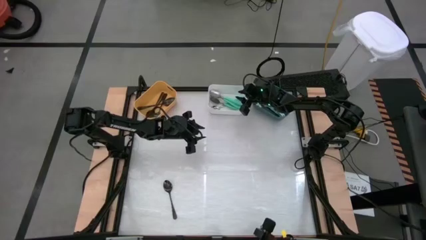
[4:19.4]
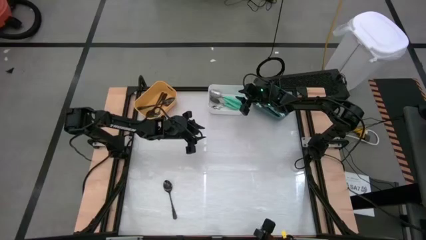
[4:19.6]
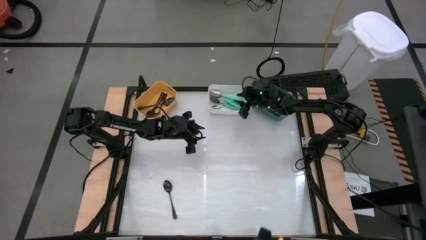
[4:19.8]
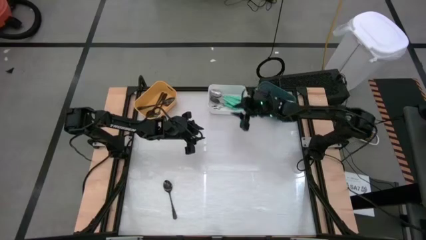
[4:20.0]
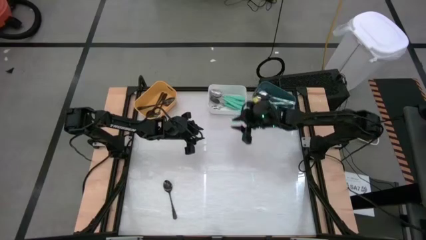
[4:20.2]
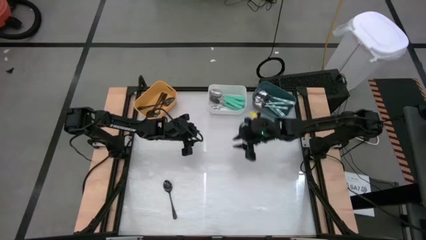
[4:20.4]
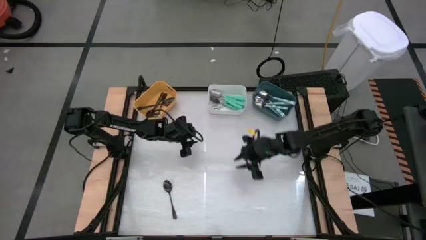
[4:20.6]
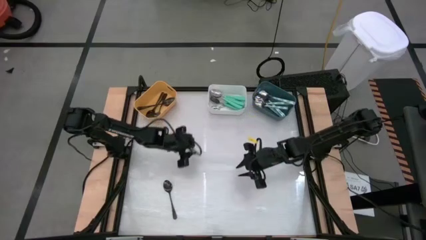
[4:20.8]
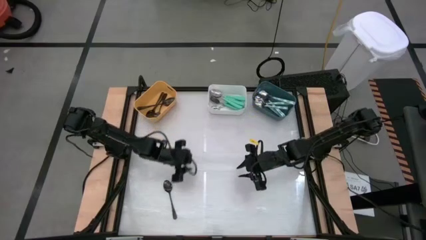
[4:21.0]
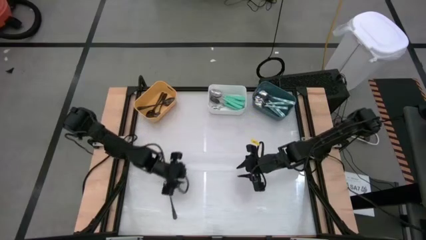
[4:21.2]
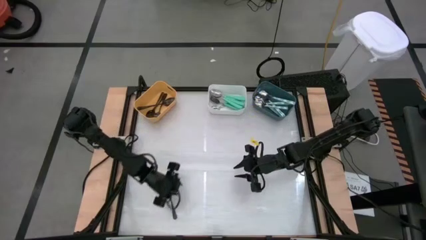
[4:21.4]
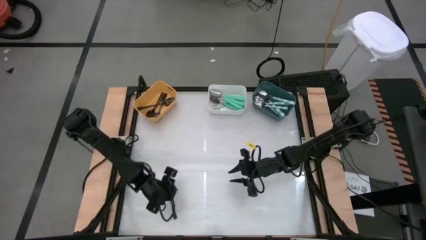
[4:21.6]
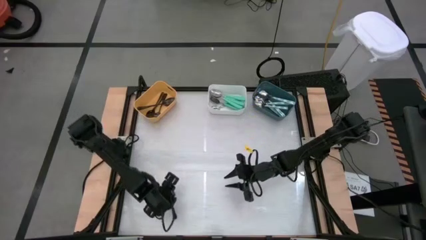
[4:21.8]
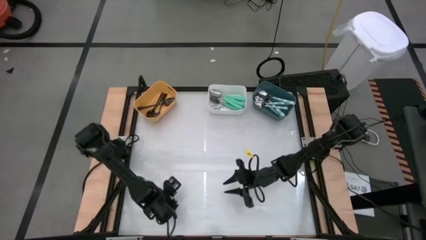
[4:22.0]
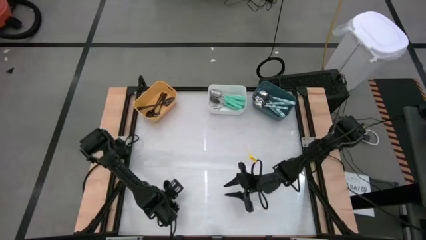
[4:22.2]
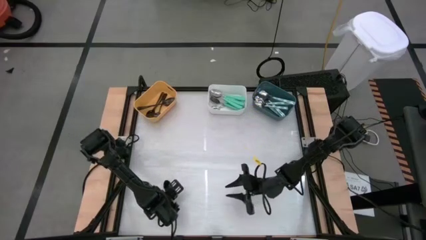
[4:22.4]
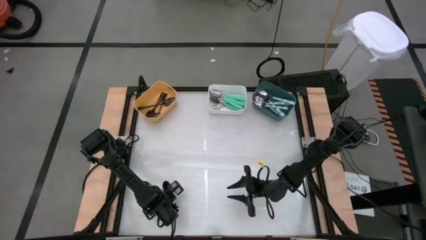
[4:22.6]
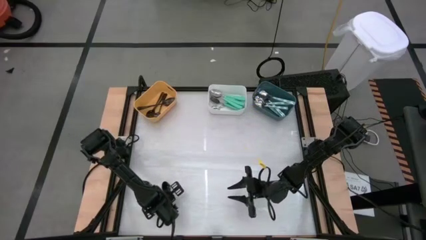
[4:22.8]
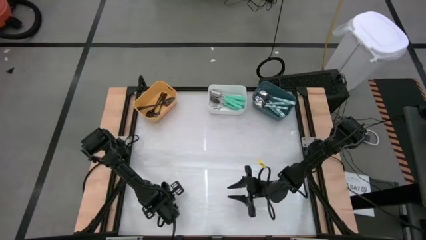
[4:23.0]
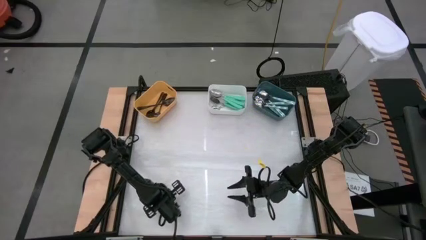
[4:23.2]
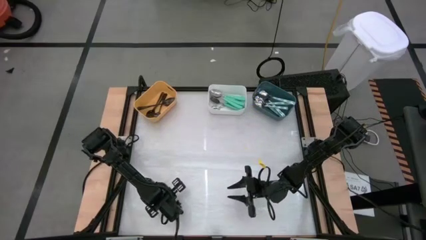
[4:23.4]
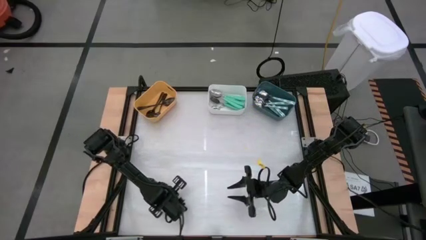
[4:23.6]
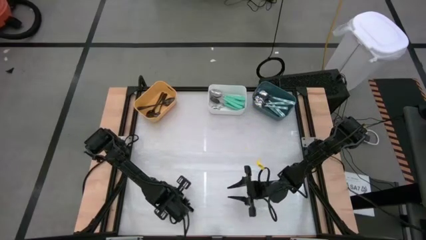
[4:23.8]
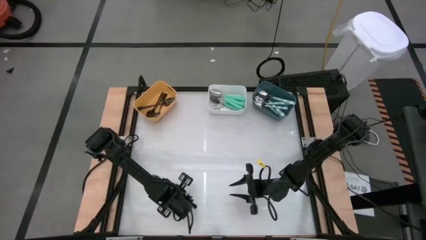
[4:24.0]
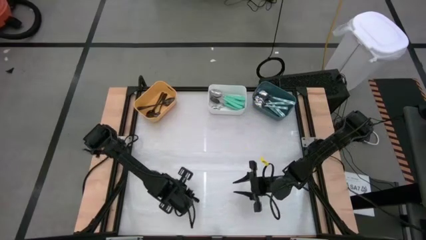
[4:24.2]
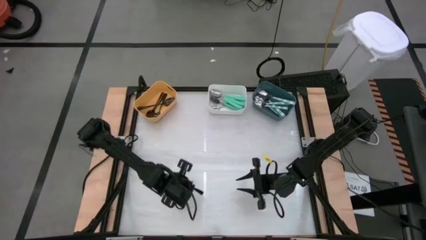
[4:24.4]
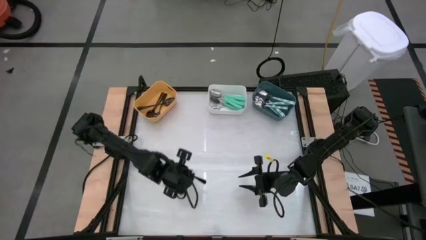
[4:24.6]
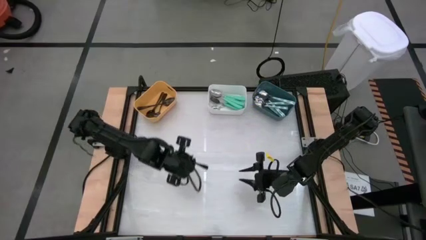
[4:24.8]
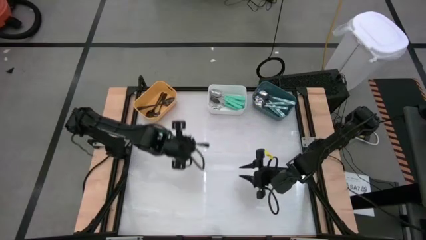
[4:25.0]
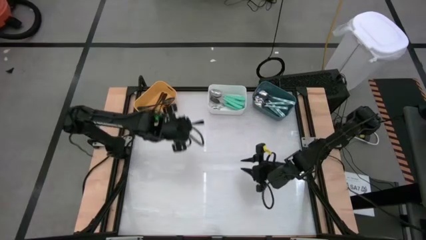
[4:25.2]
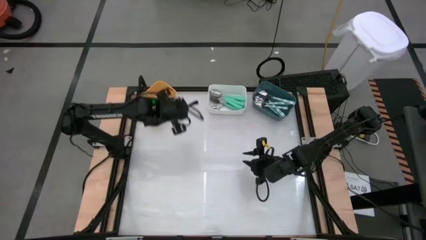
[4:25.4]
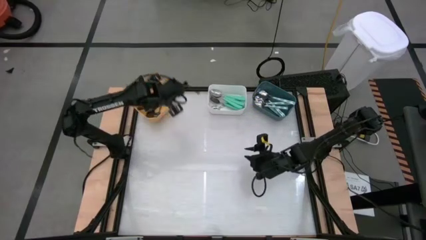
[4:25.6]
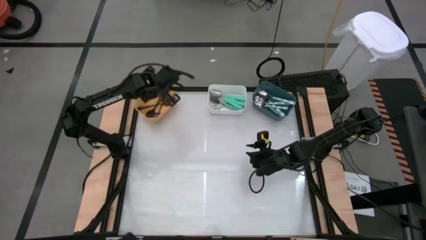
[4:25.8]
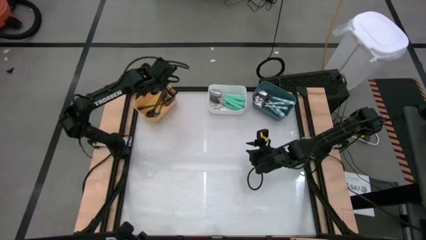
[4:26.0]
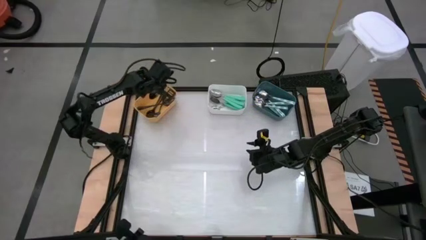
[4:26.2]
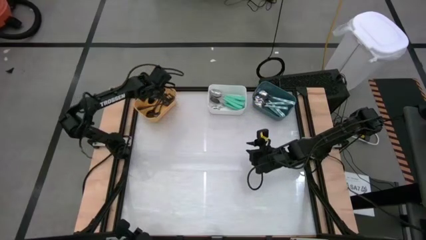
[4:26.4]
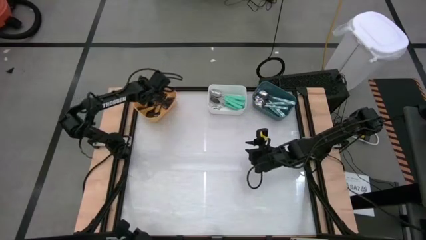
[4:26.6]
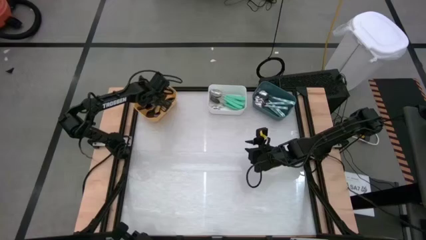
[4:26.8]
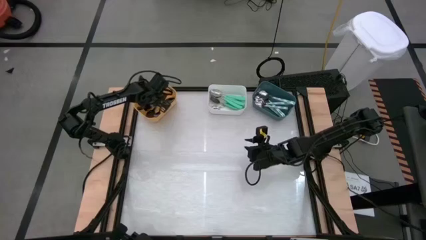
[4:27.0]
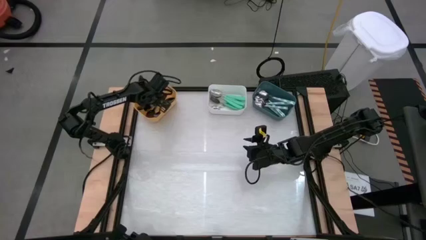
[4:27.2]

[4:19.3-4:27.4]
Task: Sort silverware by color (type)
Put the black spoon into the orange bin

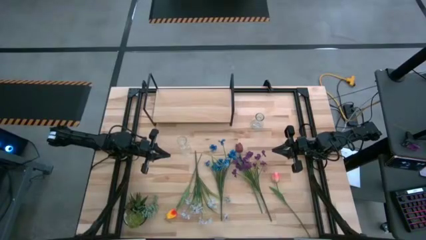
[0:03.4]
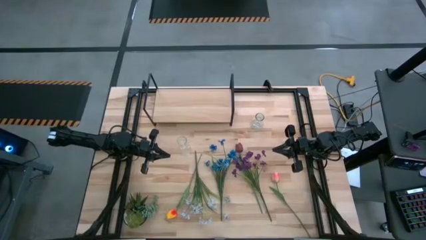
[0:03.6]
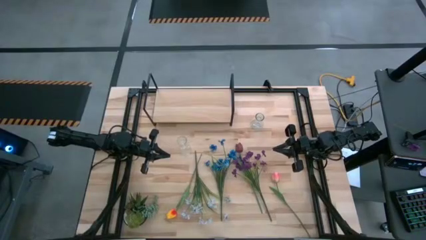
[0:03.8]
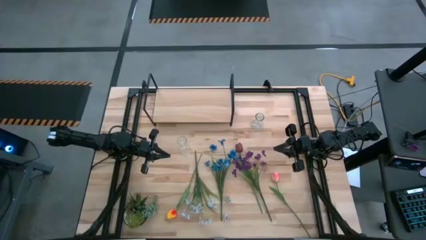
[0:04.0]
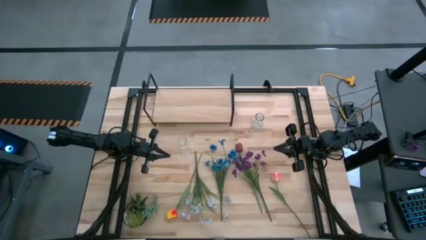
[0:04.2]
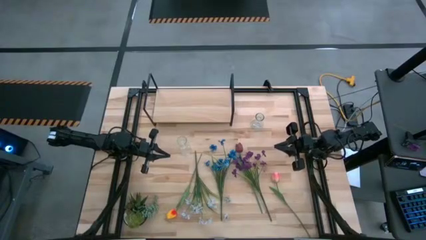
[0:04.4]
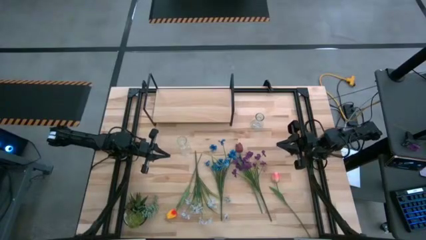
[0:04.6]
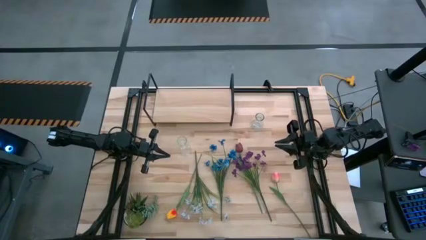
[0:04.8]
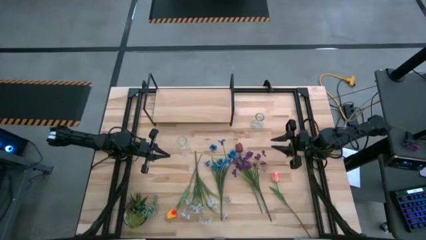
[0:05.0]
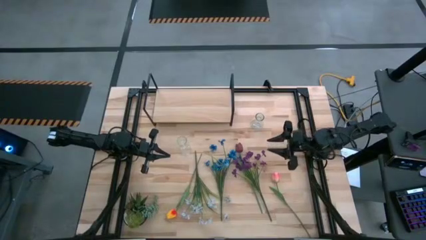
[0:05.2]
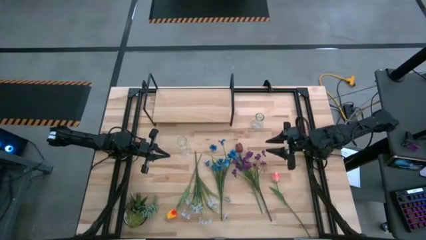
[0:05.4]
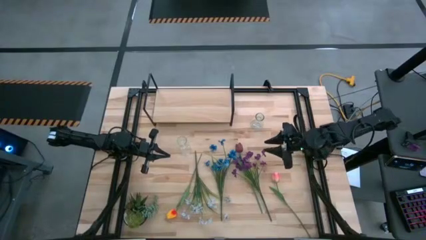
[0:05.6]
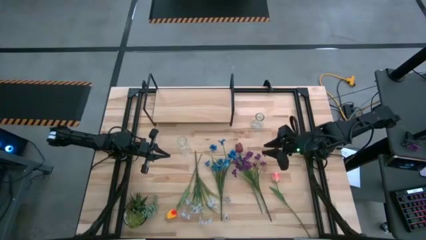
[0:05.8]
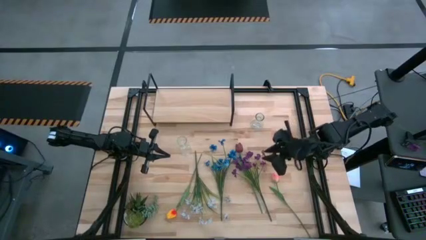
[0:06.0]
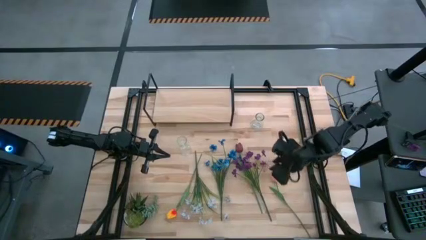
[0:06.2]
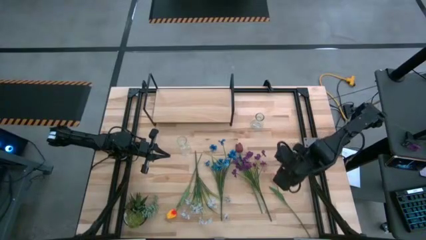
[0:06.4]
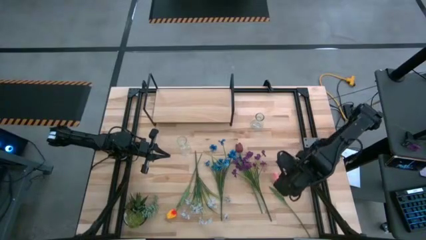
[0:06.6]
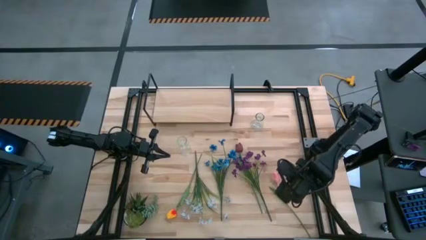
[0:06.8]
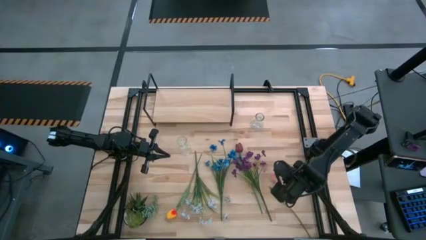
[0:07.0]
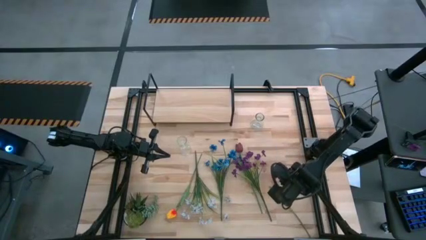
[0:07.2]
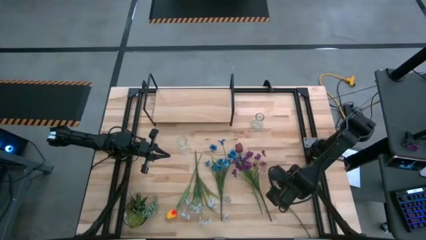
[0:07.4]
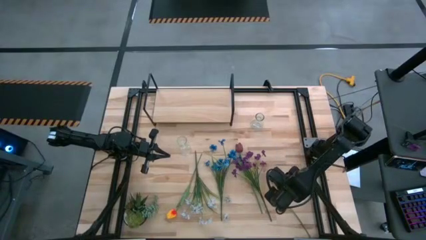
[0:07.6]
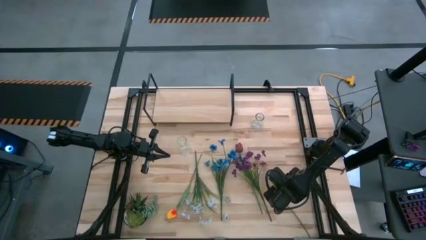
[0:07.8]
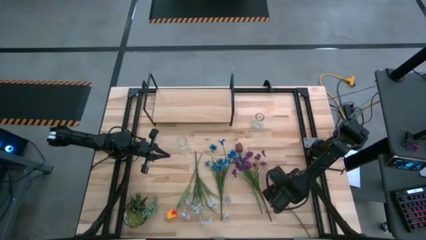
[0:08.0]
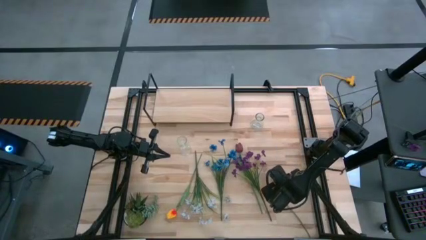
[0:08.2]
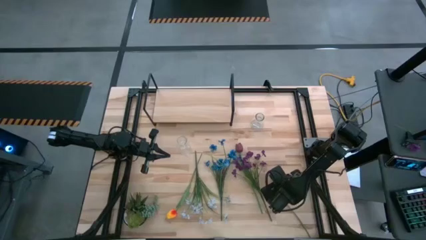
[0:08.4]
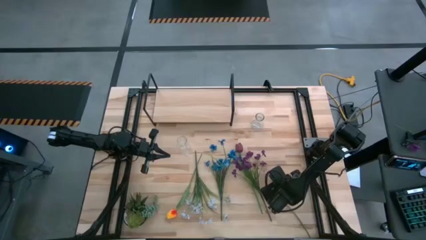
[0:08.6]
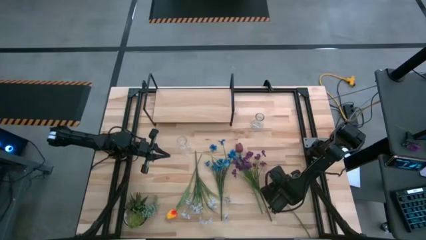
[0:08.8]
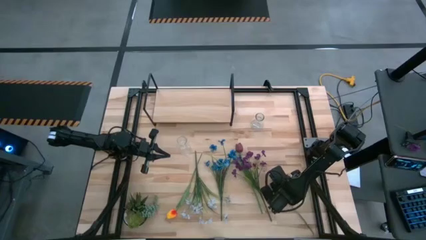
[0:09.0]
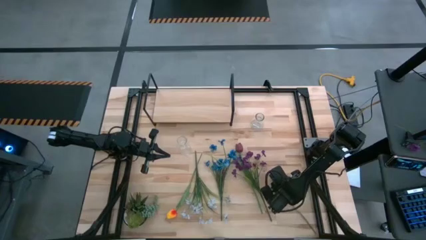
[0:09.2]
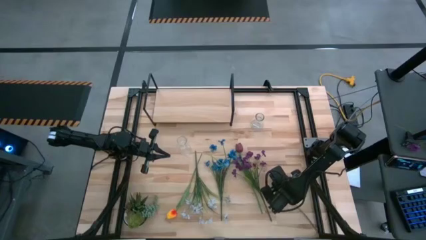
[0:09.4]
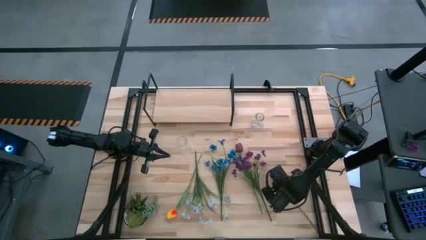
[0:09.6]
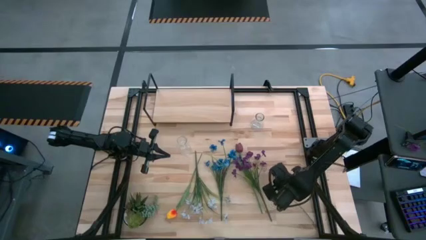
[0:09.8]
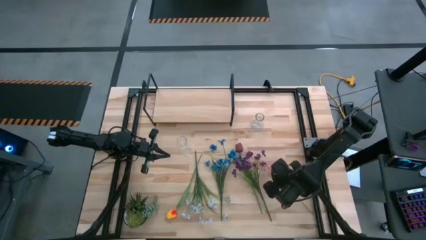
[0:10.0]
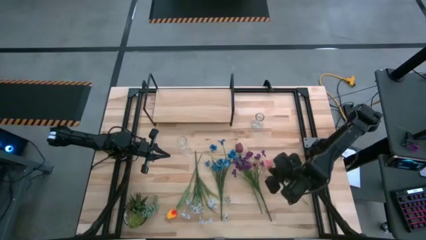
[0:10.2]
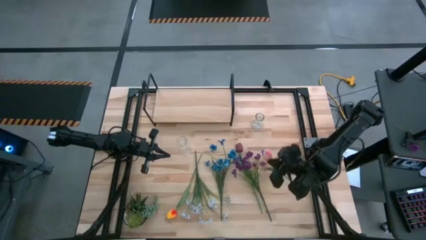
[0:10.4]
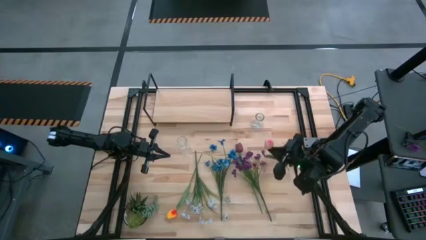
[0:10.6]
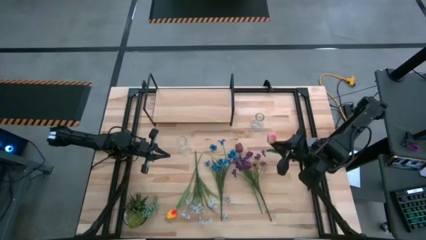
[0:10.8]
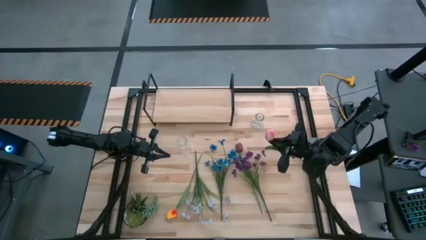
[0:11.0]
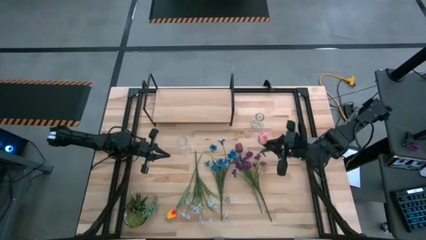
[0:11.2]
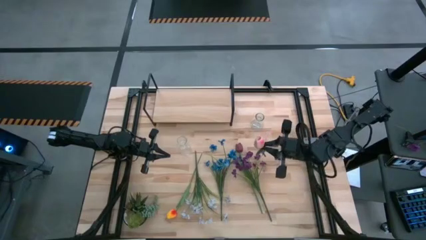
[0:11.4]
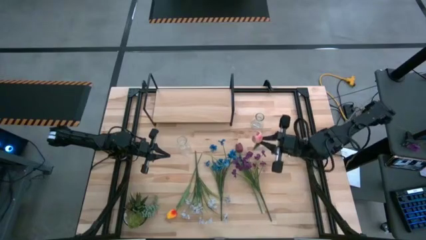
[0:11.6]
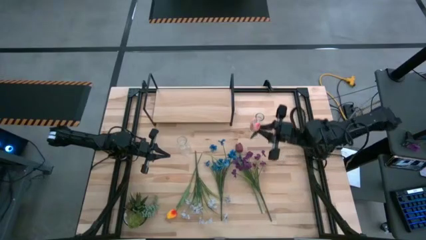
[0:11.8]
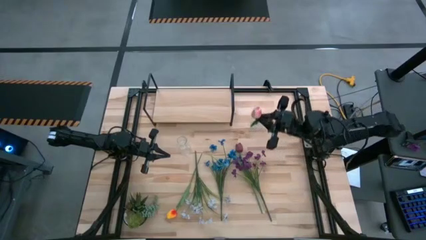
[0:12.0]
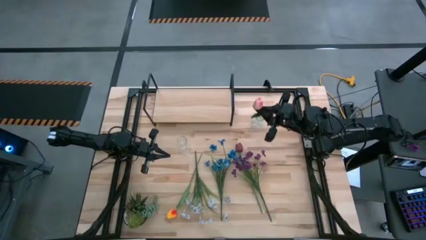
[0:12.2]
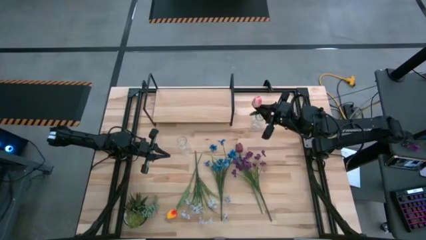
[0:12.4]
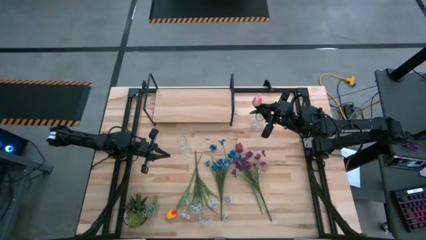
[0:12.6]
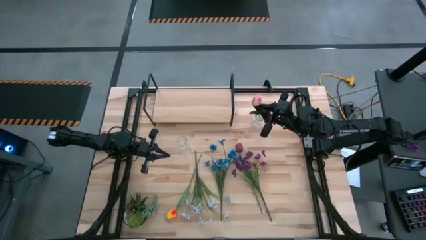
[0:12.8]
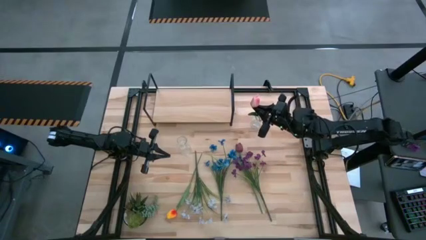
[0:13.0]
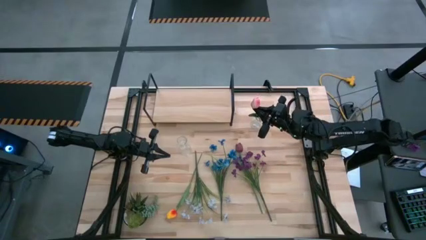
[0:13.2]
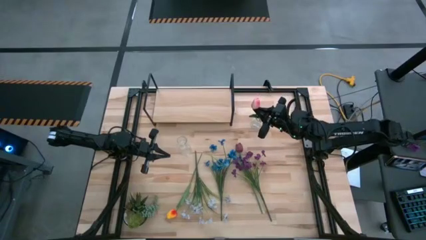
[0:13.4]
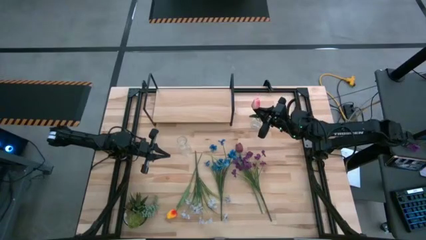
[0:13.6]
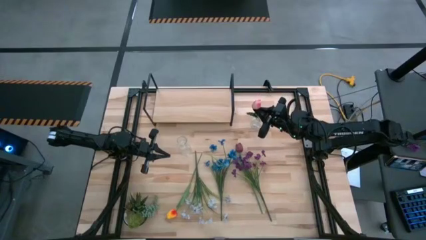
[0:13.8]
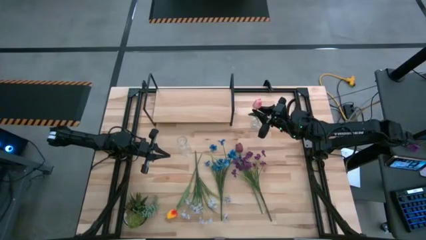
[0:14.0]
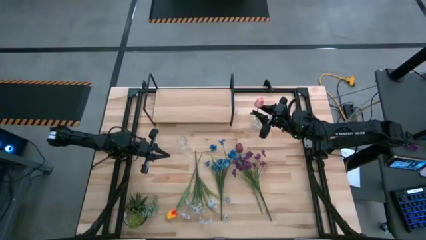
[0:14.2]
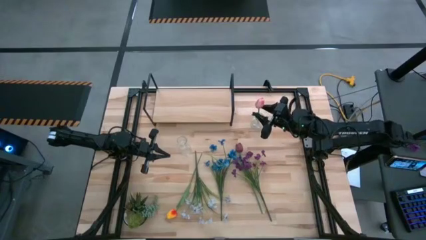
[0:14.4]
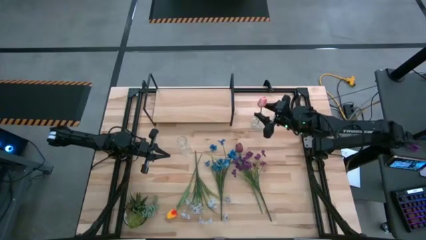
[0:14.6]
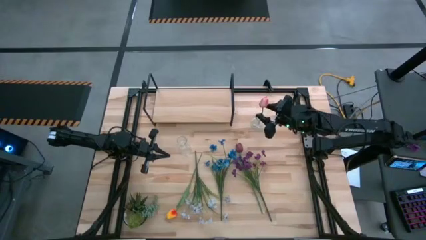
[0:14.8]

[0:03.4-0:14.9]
Task: Pick and place flowers into a vace then onto a shelf
Put the pink flower into the right transparent vase
